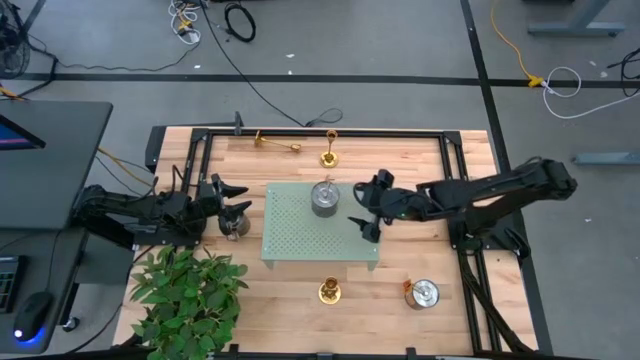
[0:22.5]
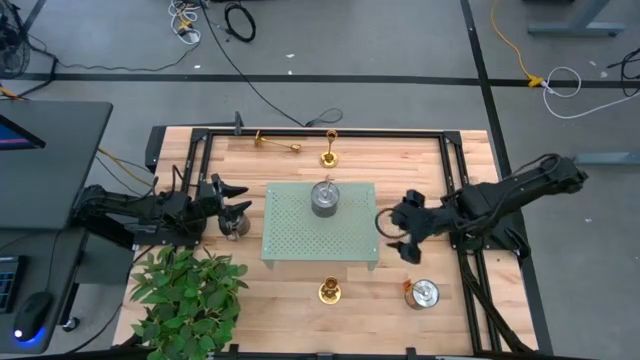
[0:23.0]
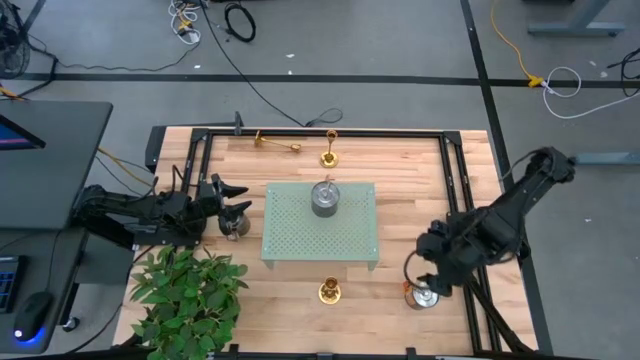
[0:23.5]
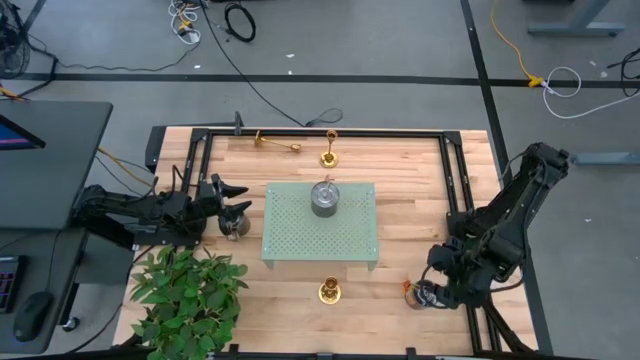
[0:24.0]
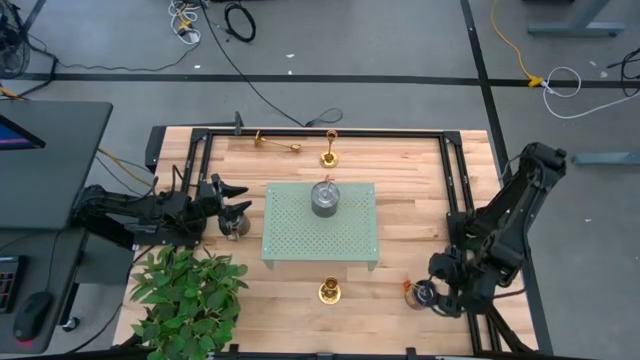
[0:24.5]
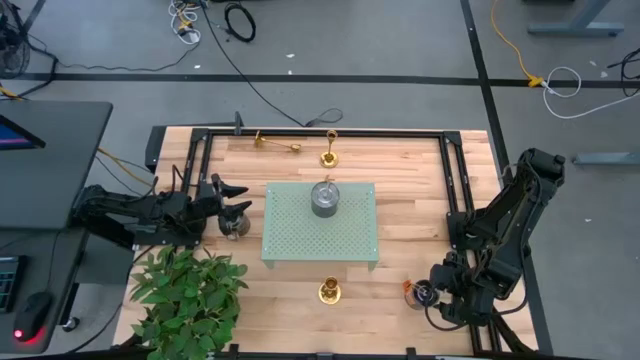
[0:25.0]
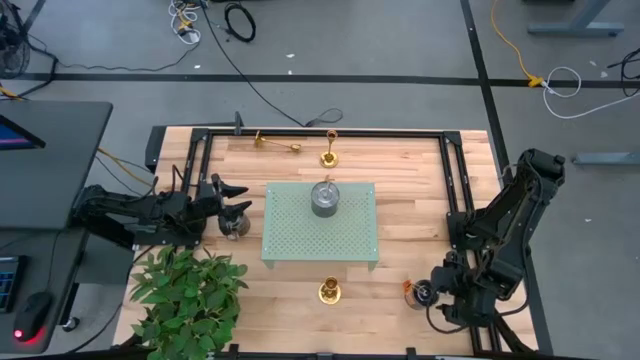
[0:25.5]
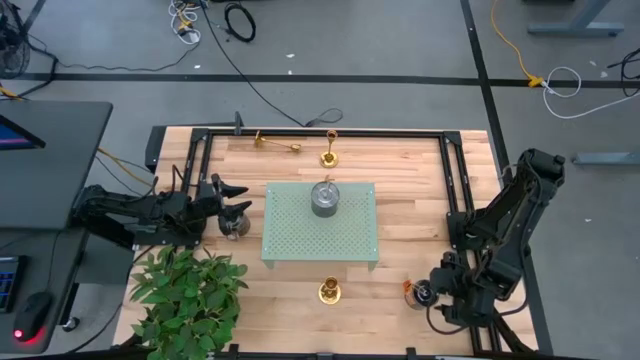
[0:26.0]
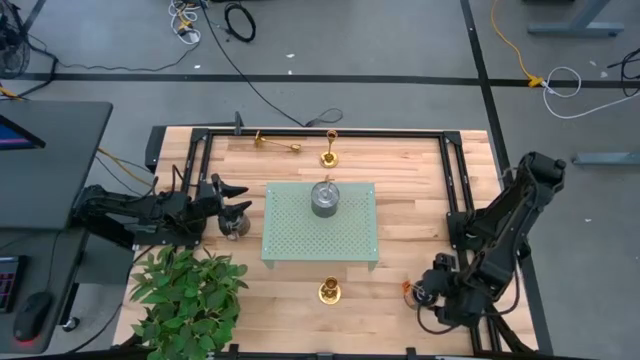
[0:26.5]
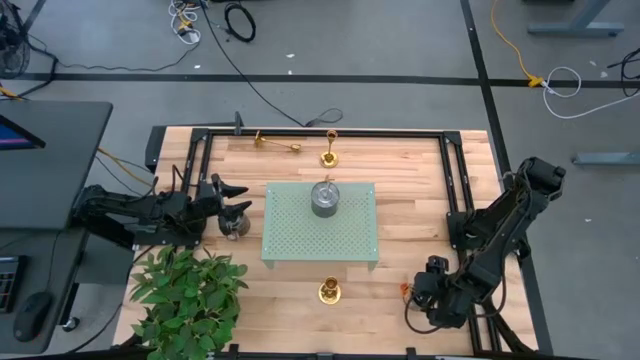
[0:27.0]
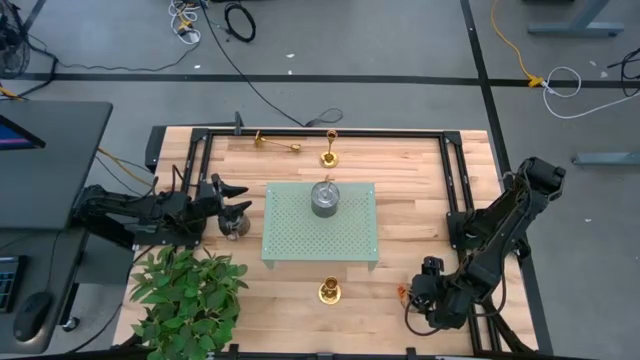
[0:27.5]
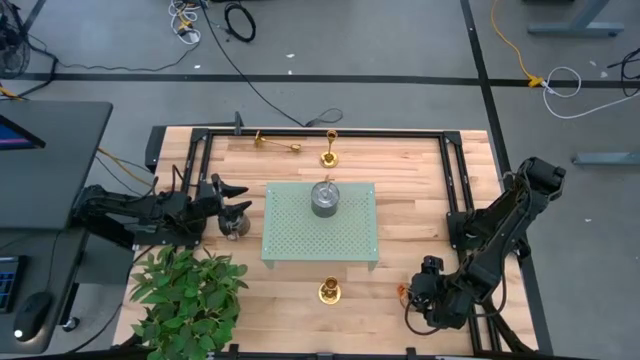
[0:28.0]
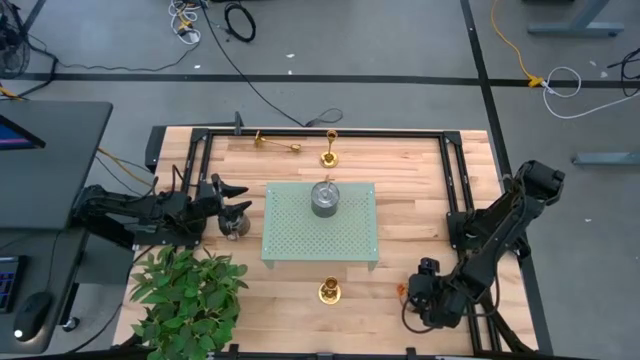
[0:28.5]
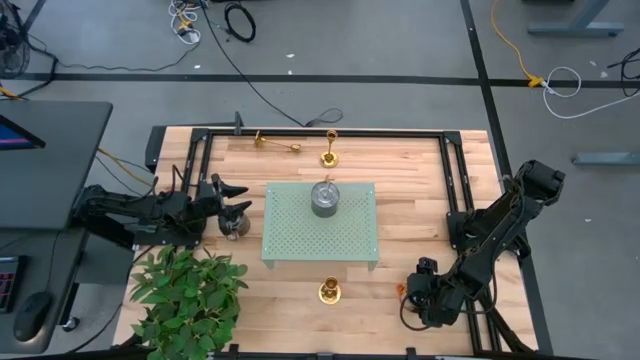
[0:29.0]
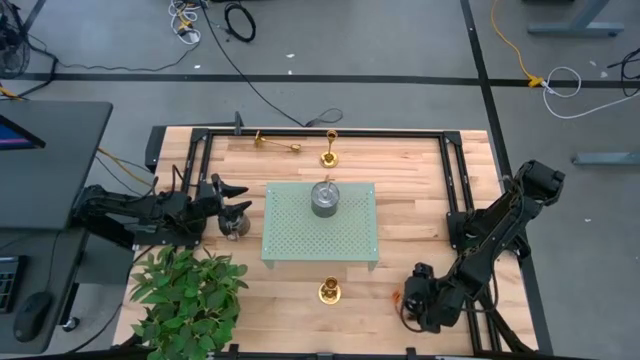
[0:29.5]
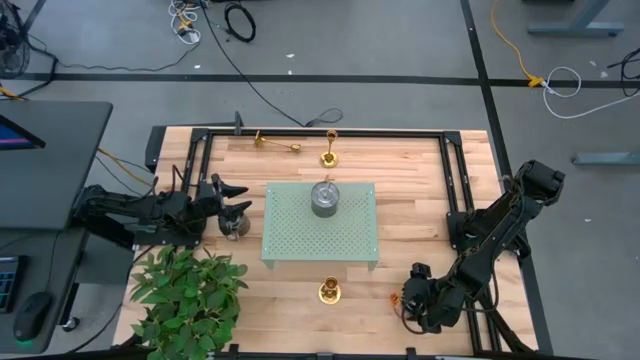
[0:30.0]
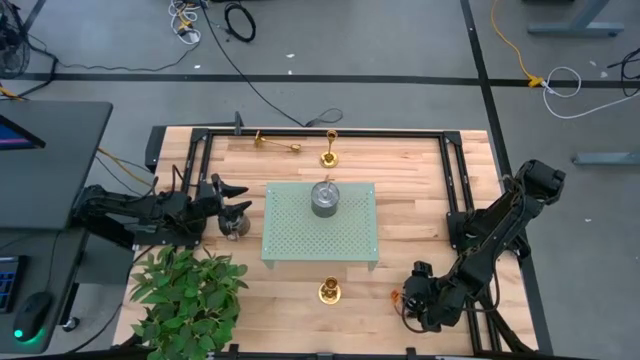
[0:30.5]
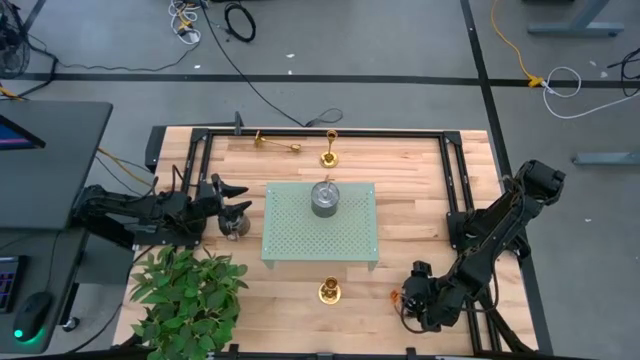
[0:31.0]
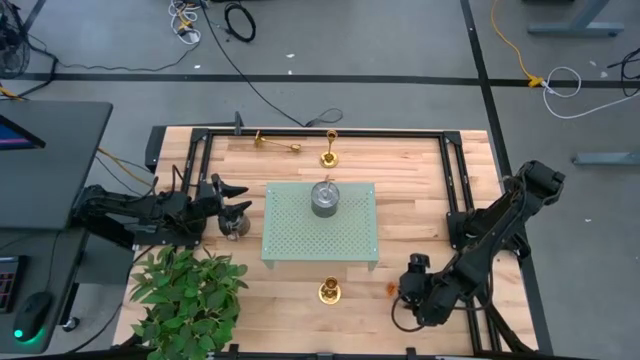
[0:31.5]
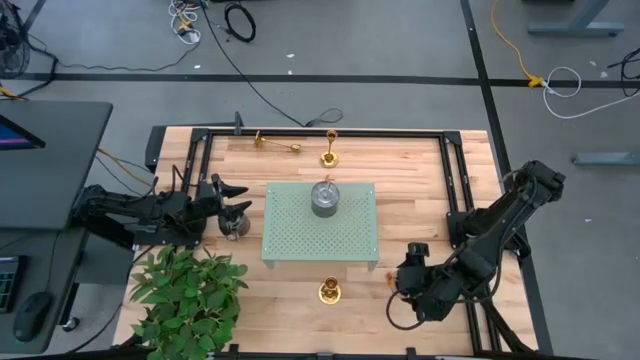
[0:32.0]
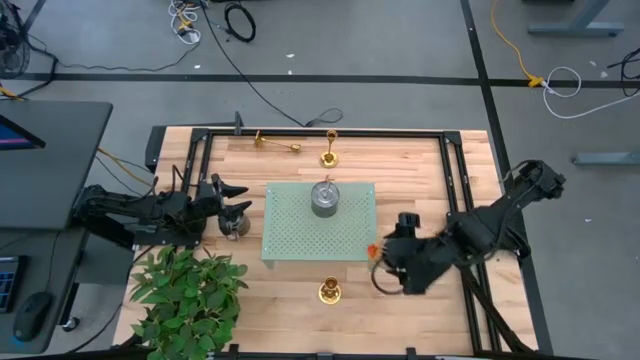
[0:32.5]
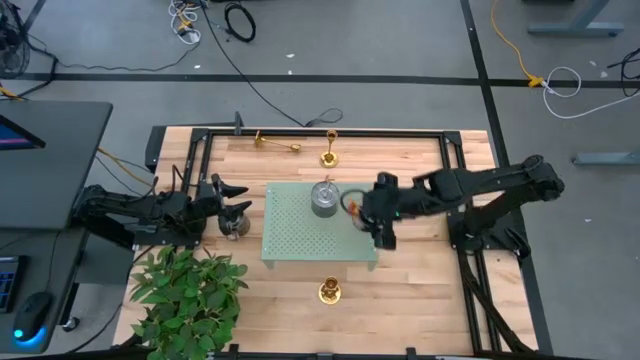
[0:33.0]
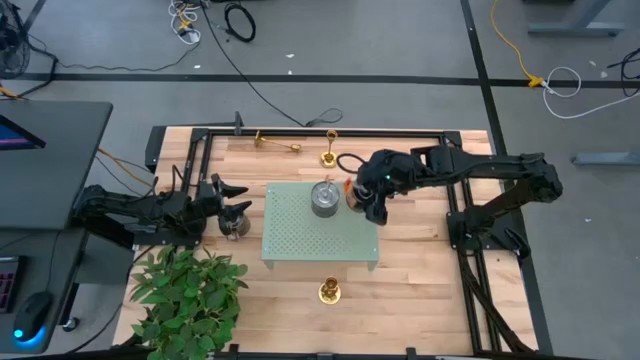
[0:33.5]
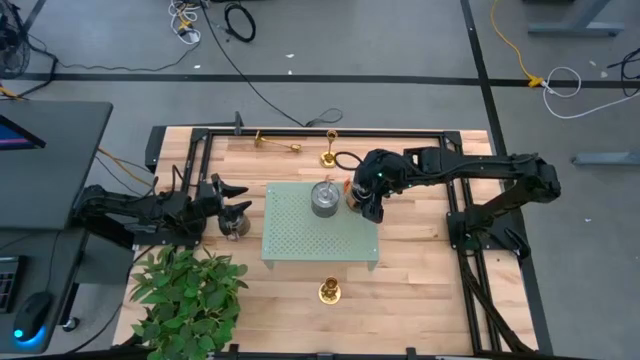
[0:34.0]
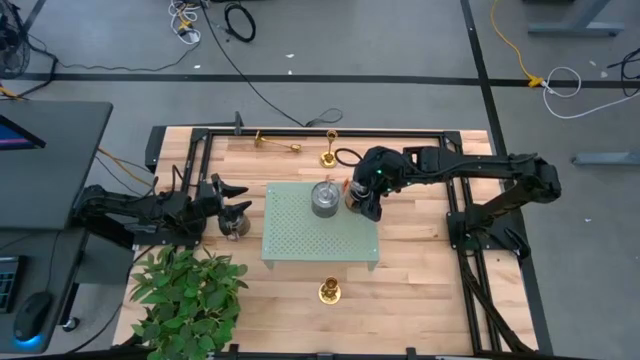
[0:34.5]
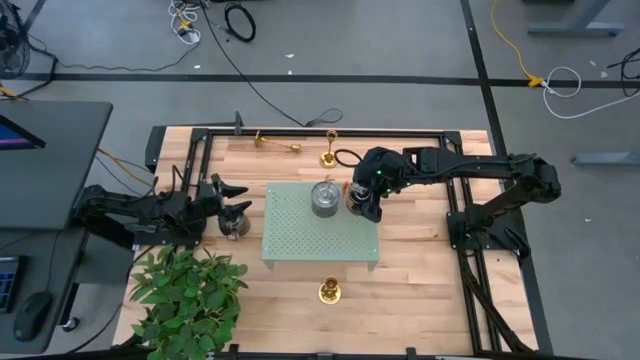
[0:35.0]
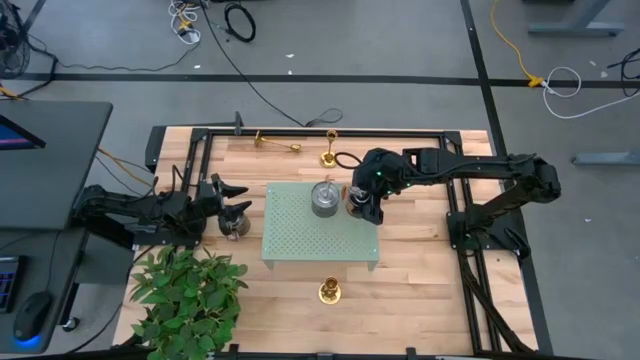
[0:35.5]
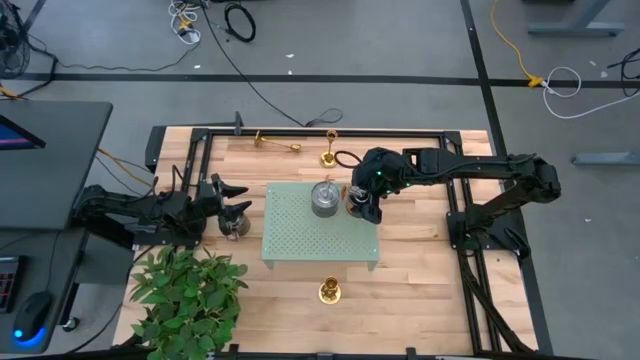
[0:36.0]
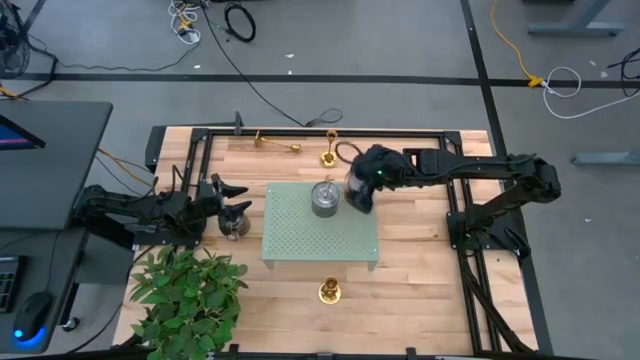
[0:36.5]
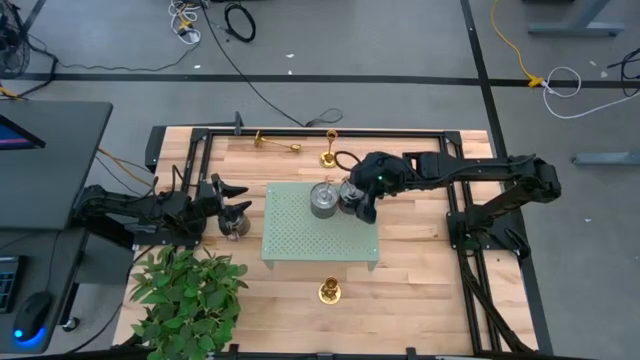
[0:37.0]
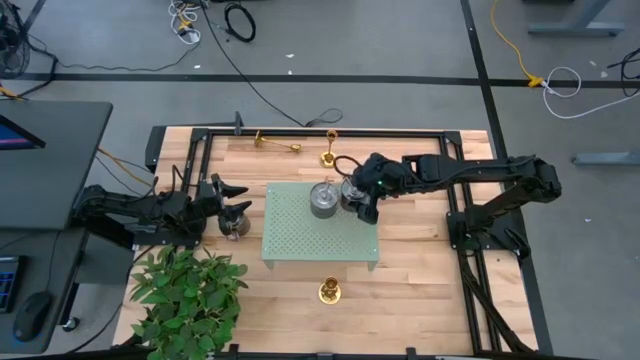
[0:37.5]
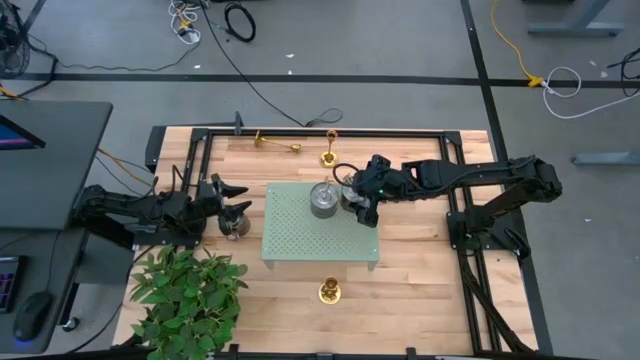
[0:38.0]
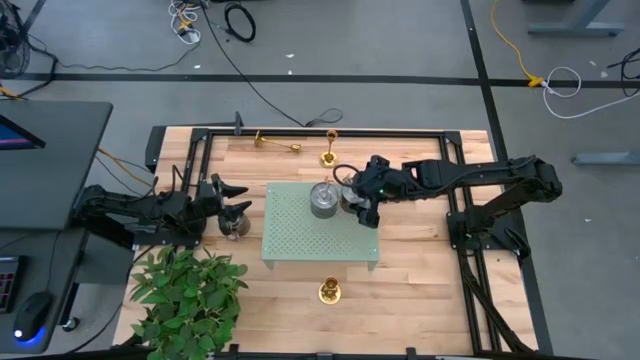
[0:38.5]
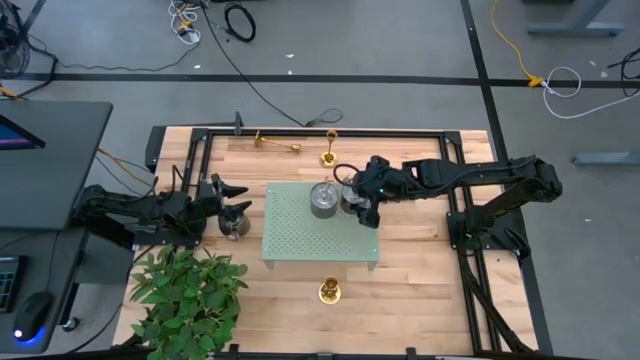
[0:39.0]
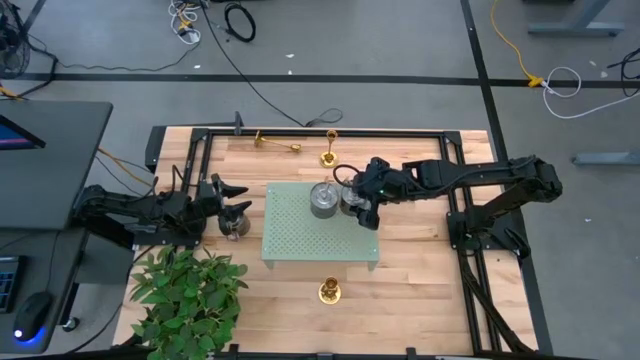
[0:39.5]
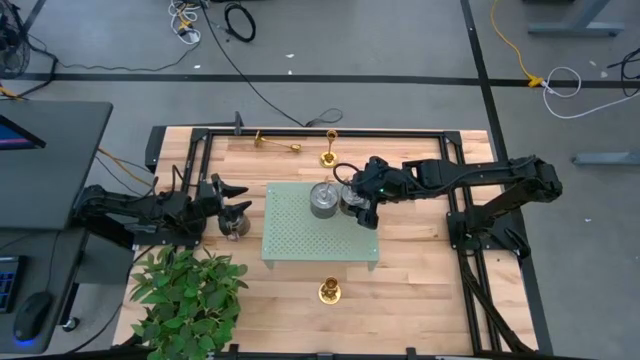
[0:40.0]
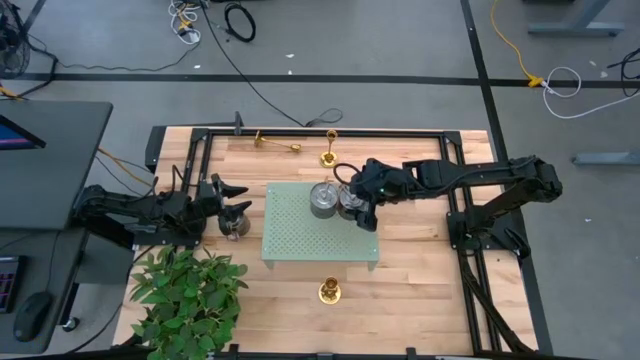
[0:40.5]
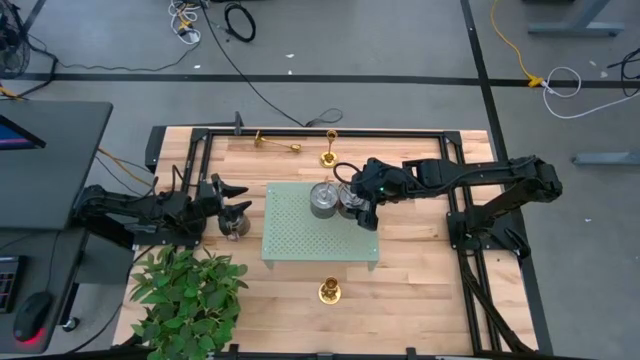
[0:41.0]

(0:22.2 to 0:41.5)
Task: Pick & Place candle stick holders
Put the bottom orange scented candle on the shelf
